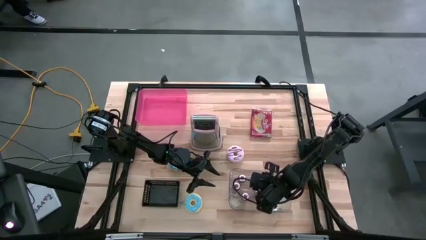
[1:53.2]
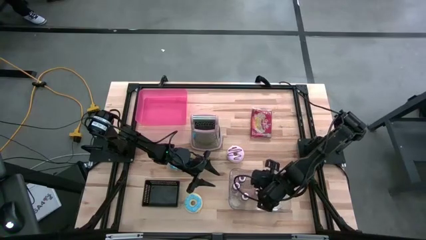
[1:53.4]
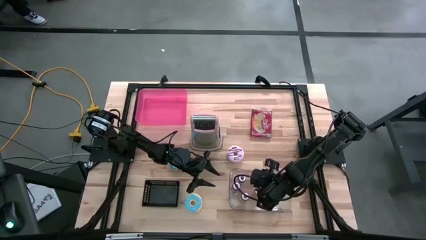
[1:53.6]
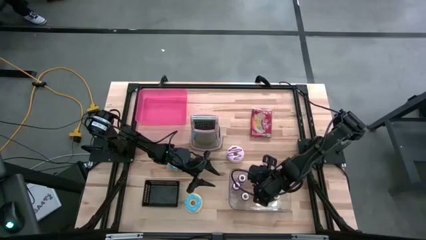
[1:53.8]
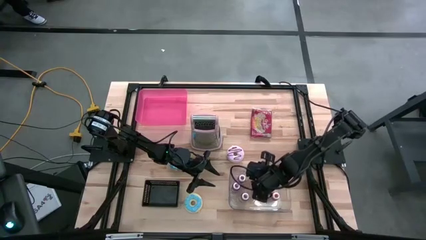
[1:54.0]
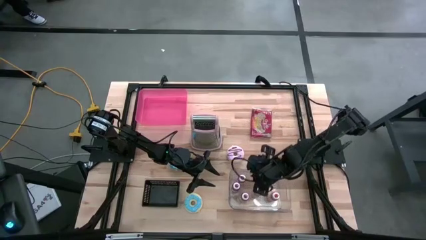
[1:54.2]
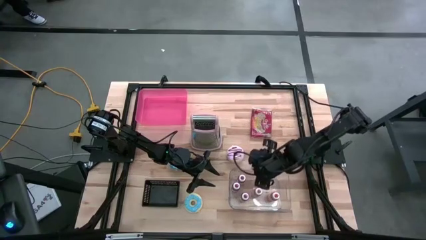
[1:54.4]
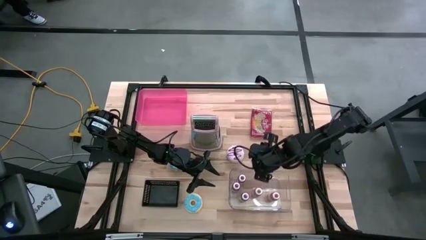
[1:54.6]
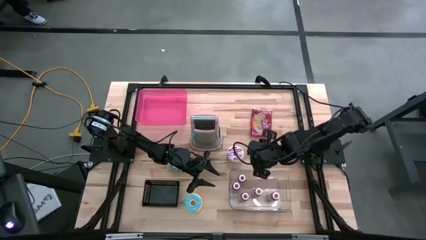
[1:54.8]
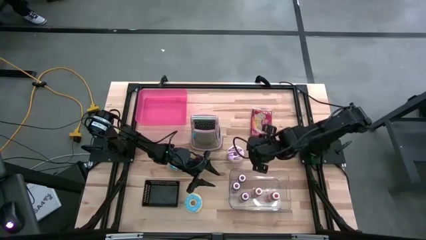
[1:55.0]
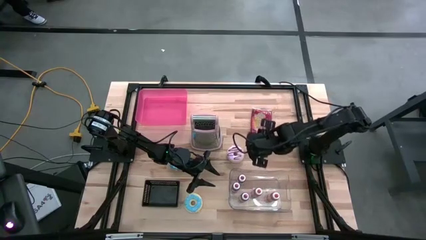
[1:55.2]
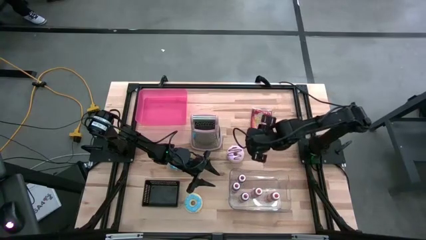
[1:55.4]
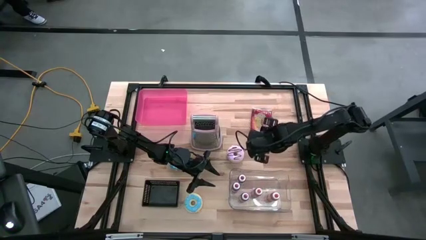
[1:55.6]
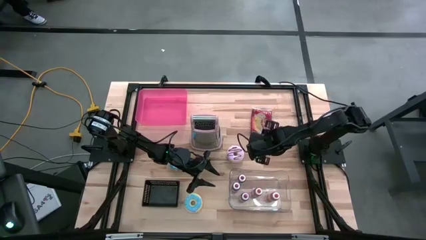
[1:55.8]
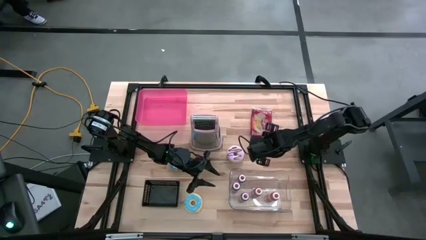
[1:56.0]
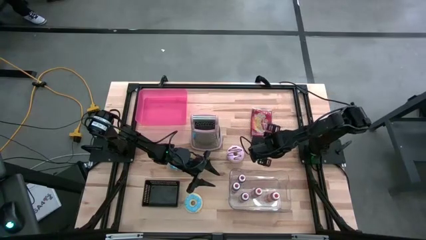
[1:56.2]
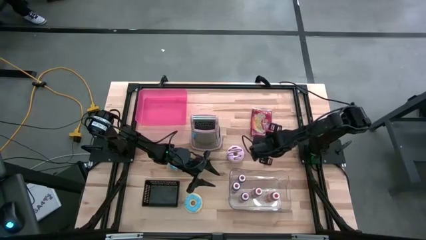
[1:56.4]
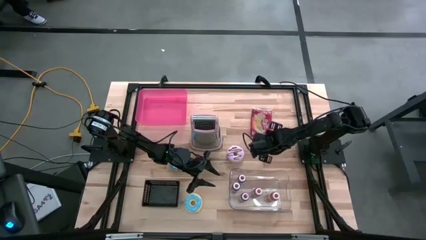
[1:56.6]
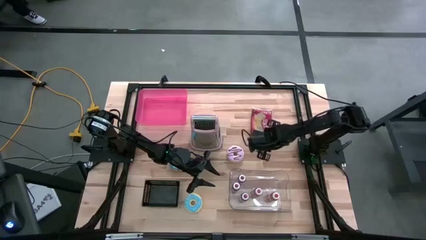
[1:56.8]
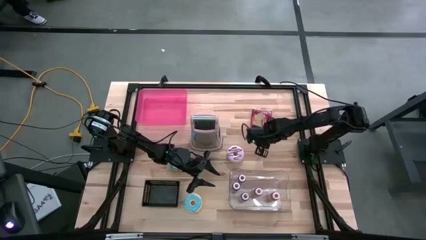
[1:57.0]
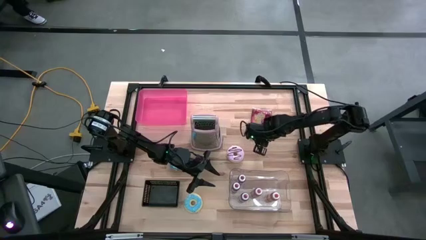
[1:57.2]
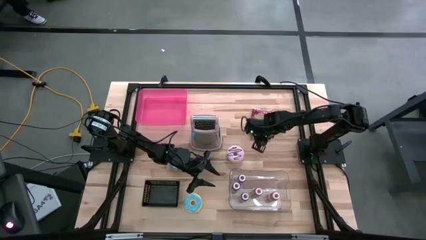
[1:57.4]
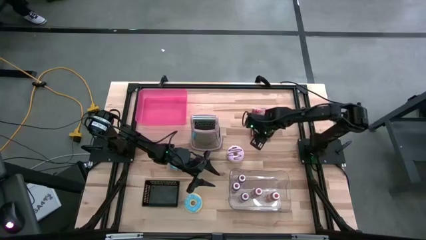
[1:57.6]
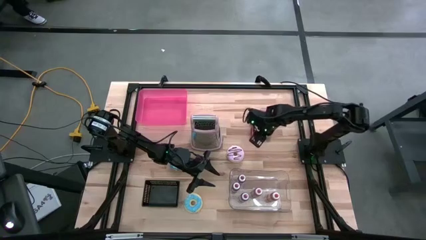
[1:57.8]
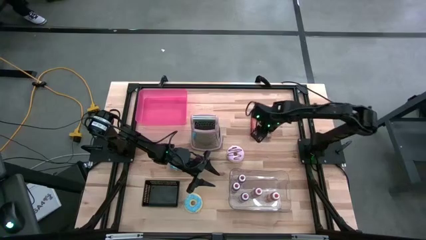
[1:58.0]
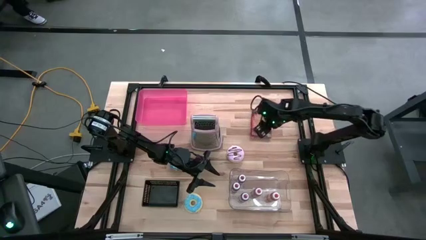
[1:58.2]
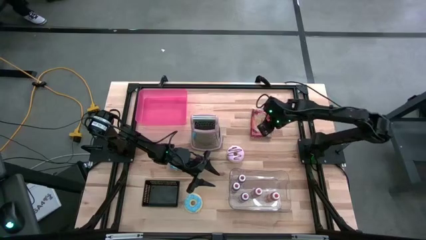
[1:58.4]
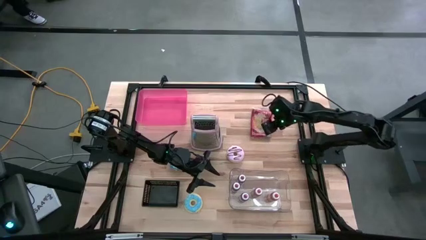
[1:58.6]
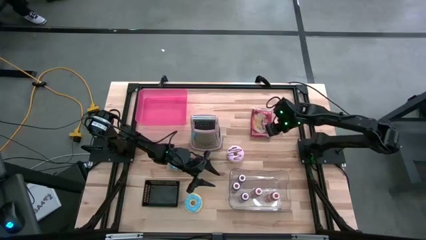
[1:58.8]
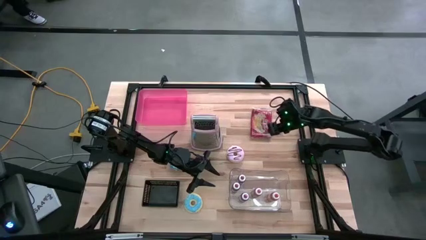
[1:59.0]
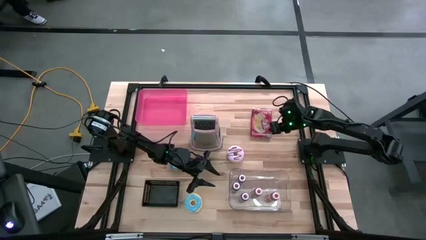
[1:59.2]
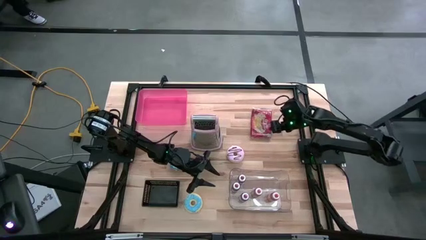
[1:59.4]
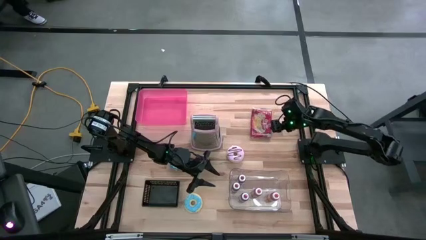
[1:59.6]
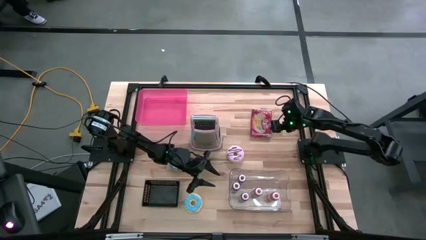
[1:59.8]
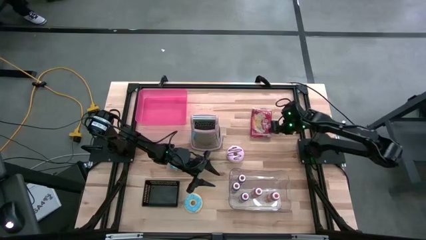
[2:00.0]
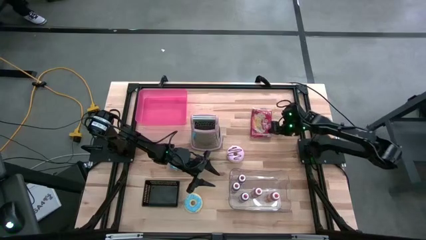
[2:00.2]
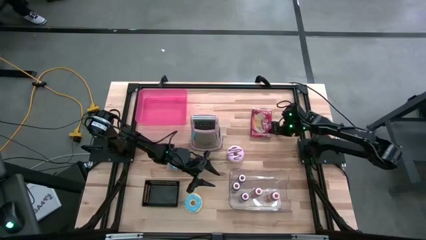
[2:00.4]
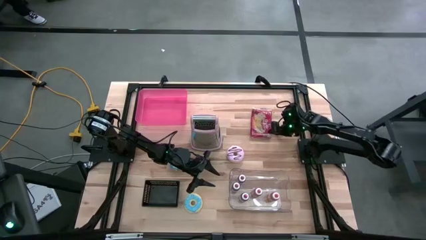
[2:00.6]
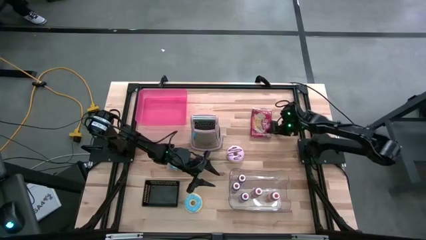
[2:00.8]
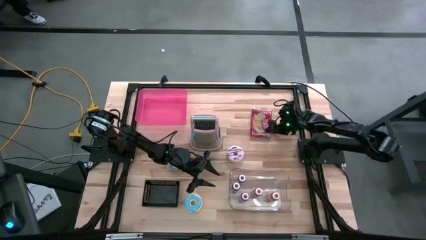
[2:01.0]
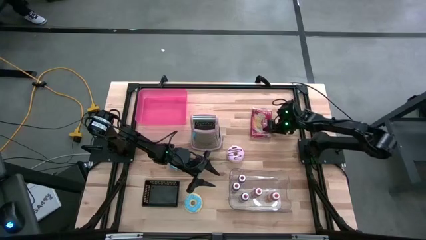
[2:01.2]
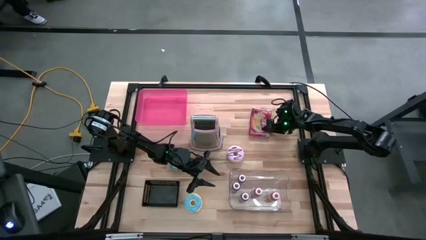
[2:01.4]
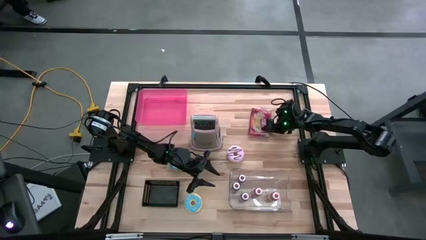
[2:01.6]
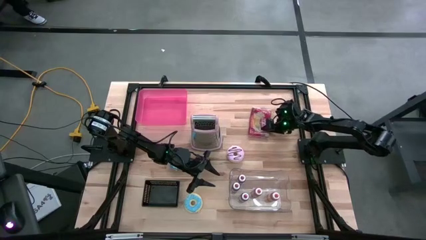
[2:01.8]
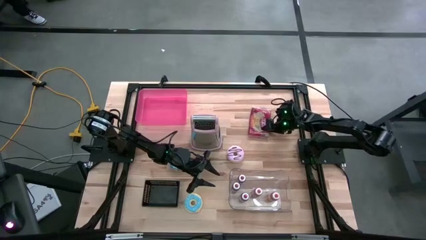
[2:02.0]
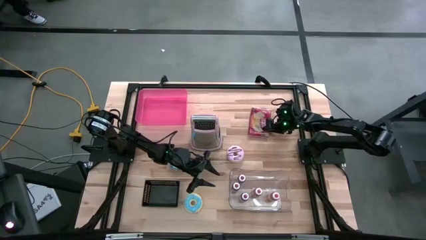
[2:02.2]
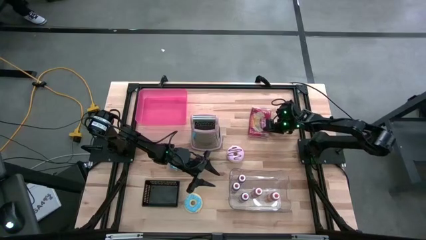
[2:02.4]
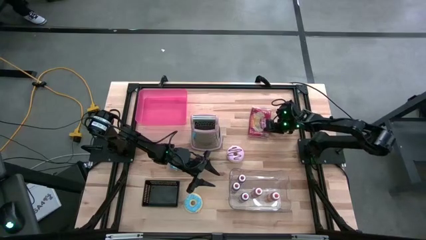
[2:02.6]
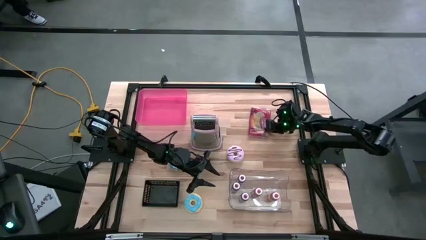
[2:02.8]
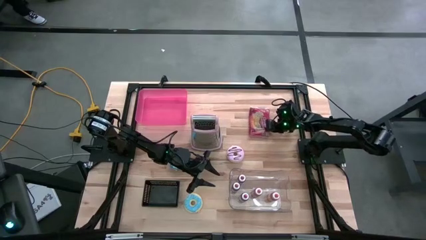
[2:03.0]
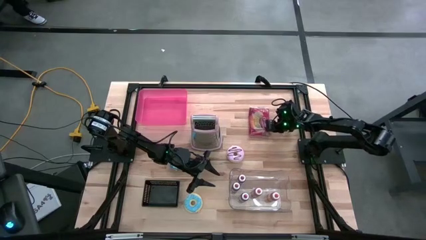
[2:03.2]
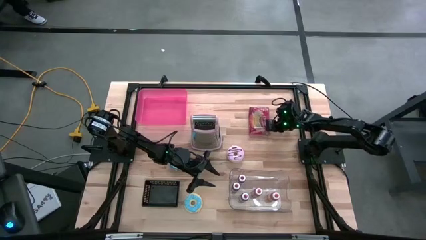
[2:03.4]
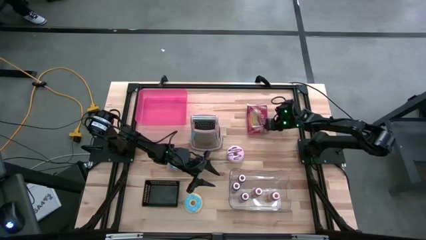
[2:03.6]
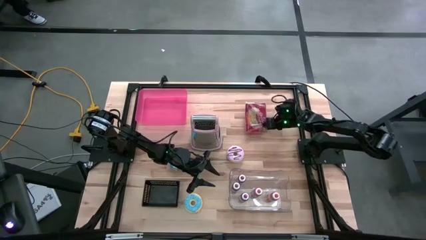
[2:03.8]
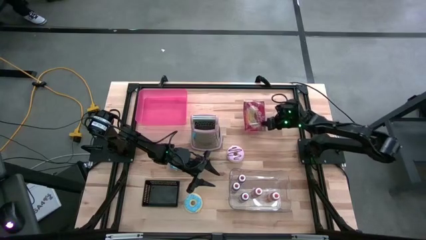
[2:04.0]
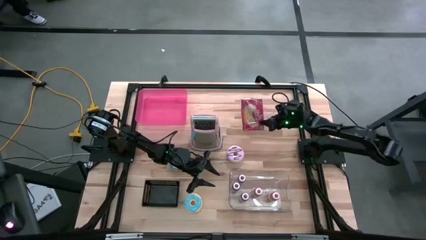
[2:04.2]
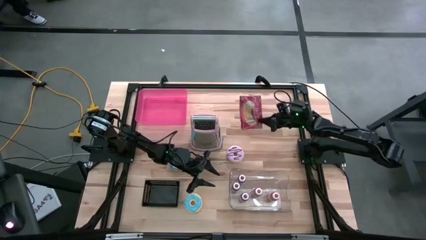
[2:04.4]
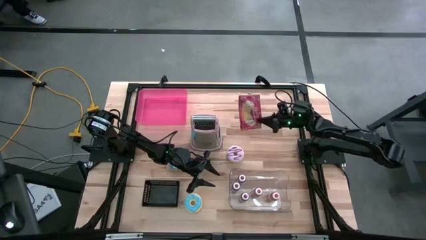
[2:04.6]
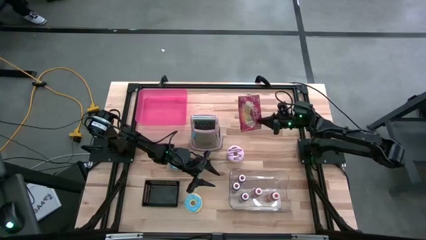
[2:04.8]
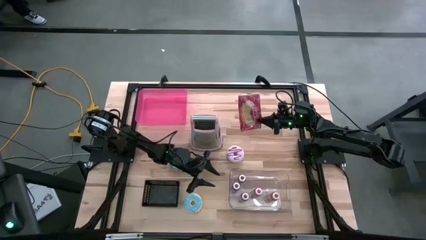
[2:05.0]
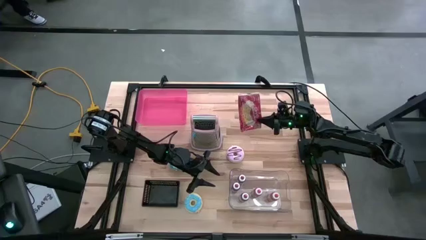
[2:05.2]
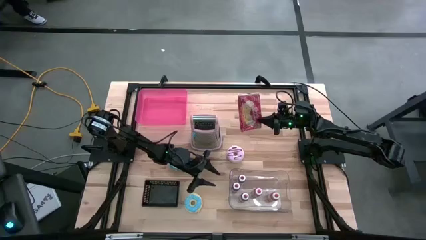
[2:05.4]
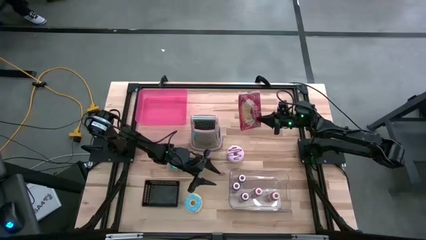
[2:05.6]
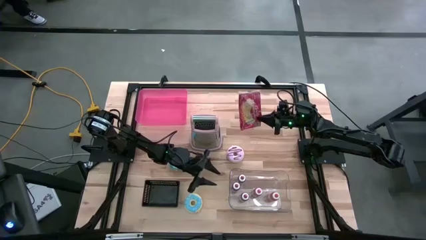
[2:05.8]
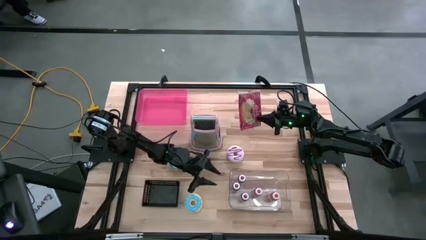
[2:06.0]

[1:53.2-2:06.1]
Task: Pick & Place Food Item
Put the popcorn bag into the pink bin

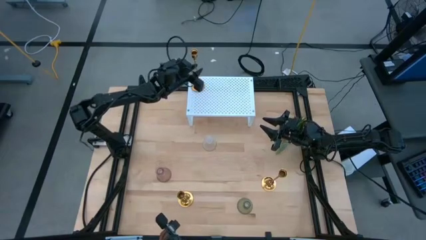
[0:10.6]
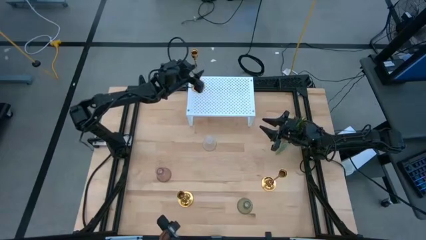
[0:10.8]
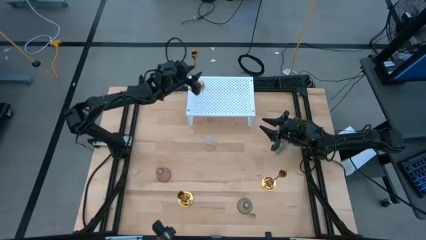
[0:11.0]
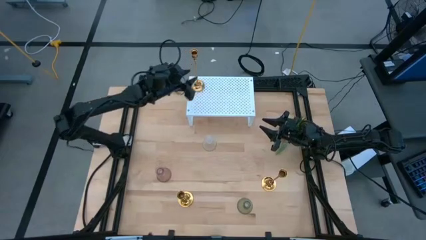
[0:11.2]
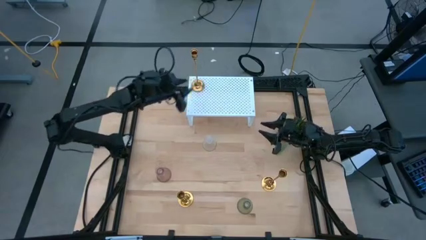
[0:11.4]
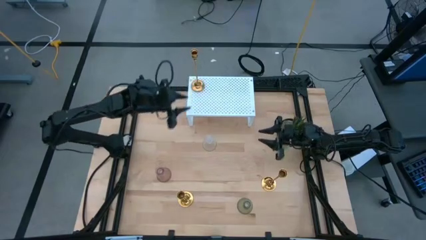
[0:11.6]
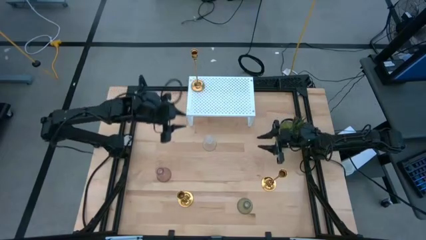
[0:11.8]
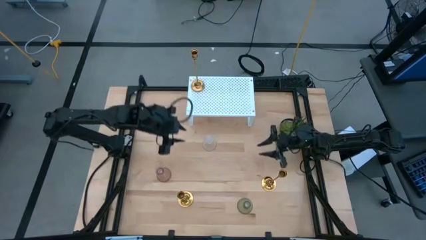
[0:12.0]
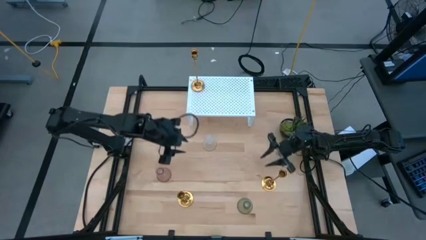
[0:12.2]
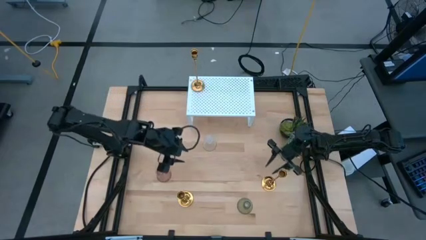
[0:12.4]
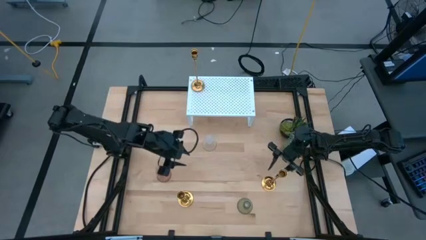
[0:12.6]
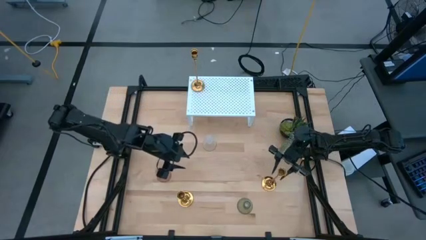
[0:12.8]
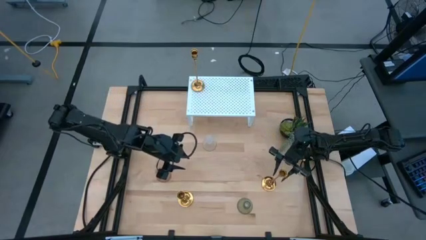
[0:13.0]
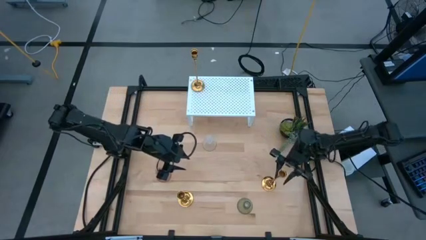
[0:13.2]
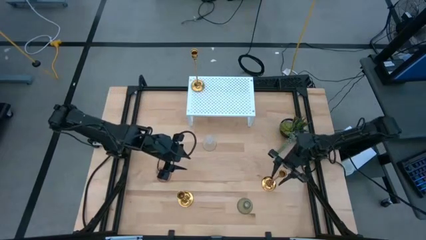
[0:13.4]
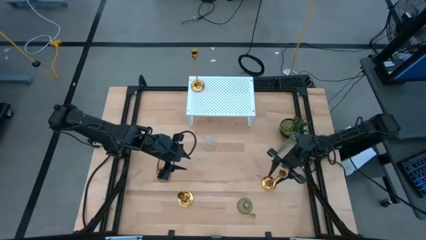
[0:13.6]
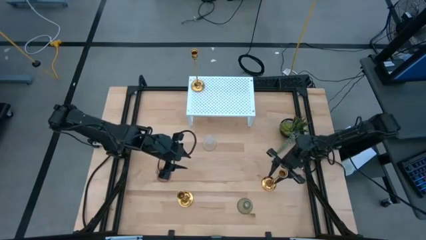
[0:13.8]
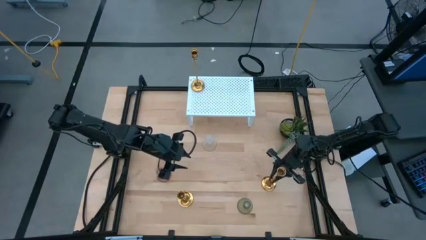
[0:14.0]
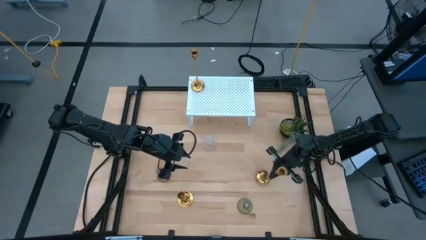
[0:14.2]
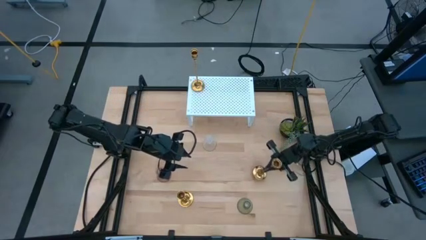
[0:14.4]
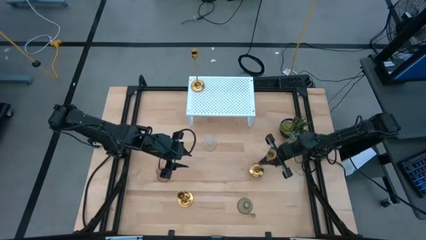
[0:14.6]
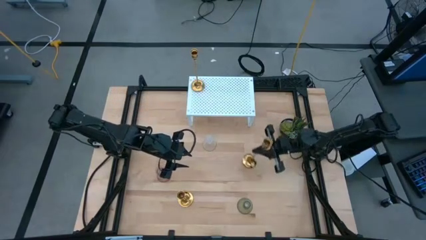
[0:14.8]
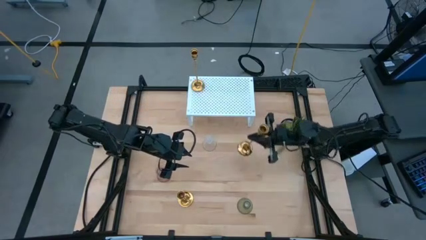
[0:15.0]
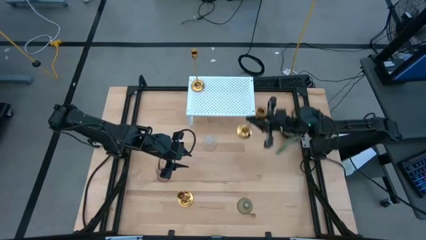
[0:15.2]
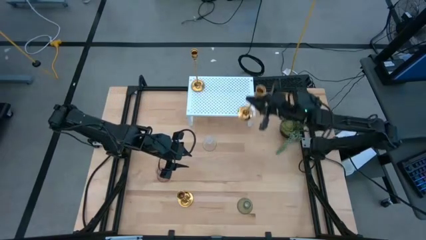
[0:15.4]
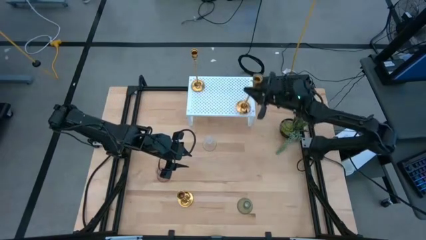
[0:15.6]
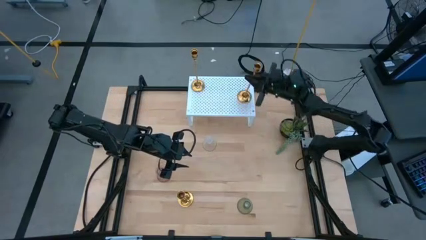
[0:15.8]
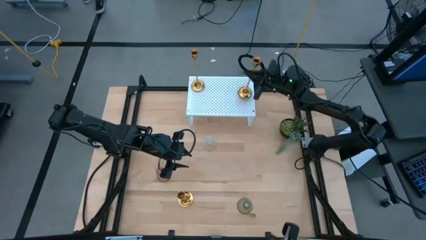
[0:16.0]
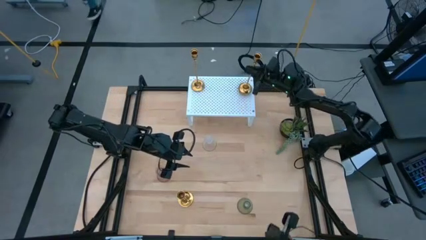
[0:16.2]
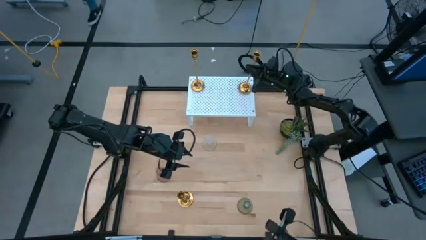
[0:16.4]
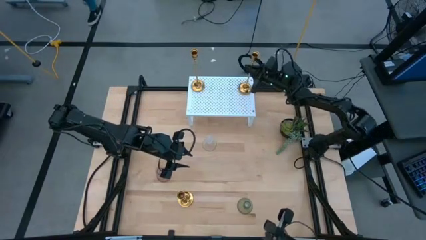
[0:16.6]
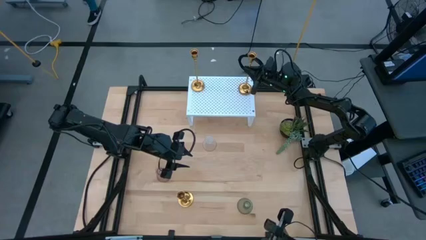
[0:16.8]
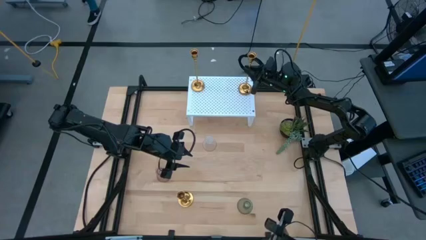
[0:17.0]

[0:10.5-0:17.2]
Task: Pick & Place candle stick holders
Put the right gold candle holder on the shelf aligned with the other gold candle holder
